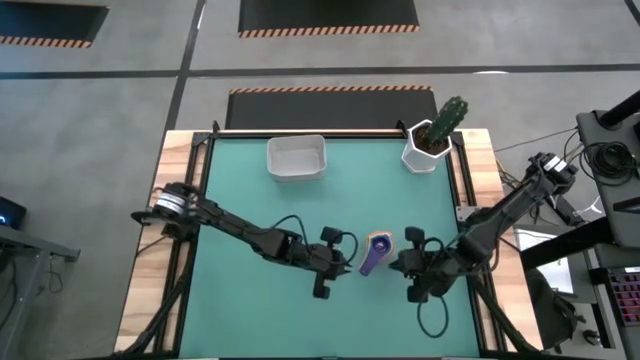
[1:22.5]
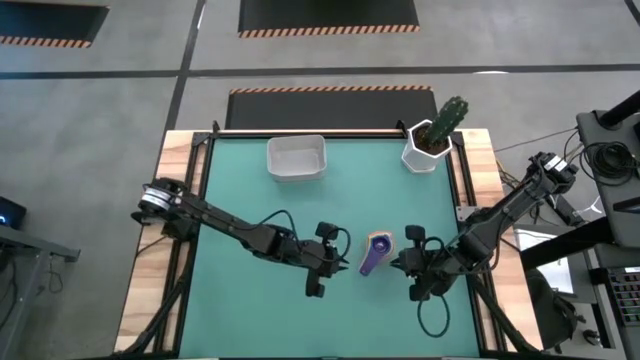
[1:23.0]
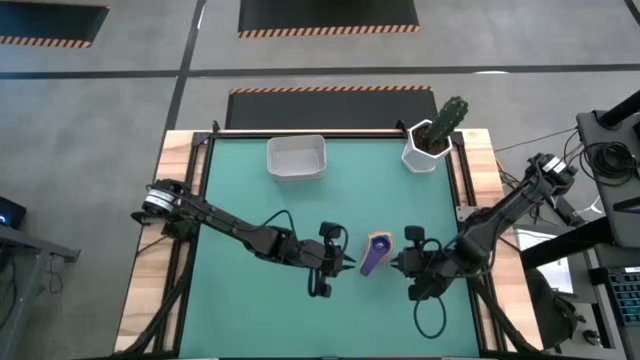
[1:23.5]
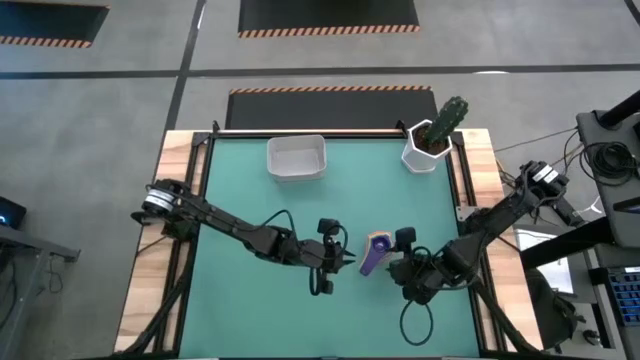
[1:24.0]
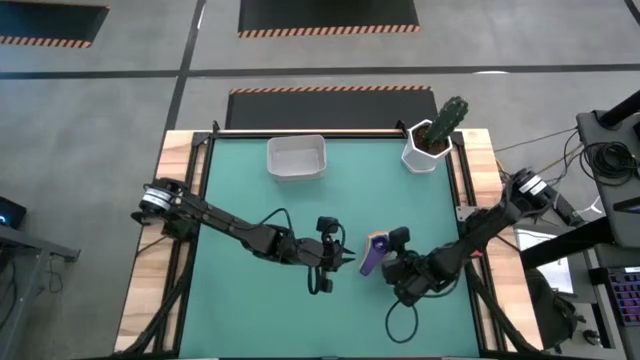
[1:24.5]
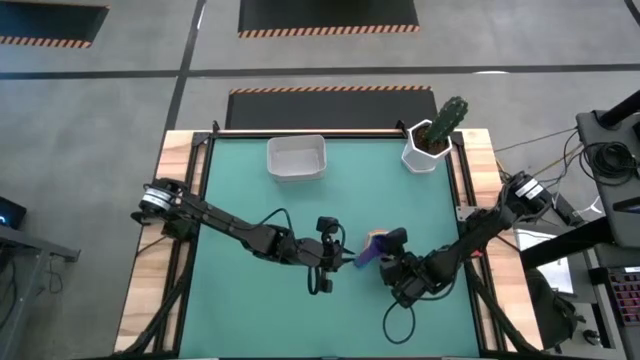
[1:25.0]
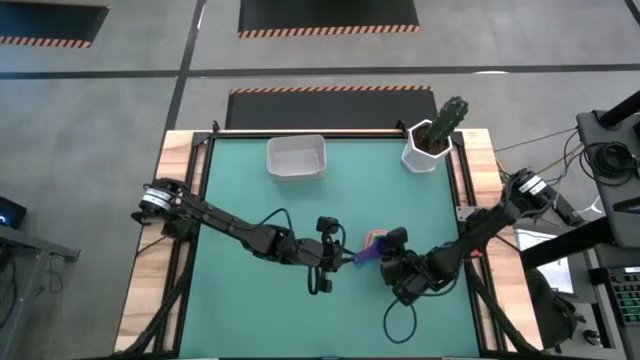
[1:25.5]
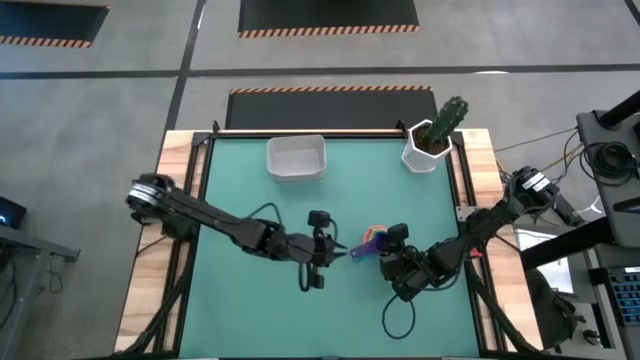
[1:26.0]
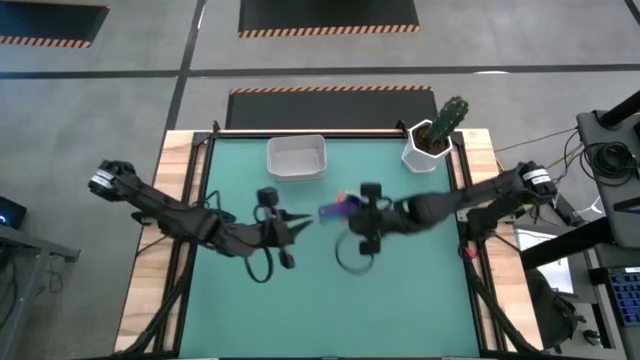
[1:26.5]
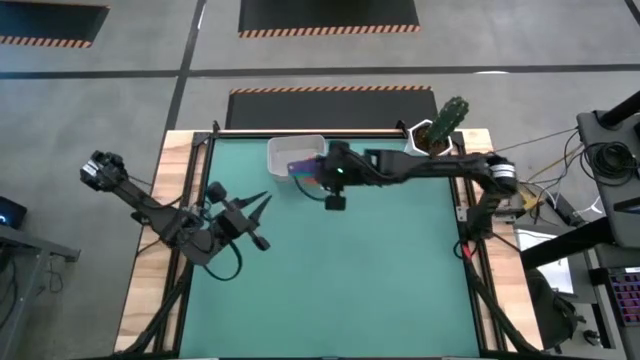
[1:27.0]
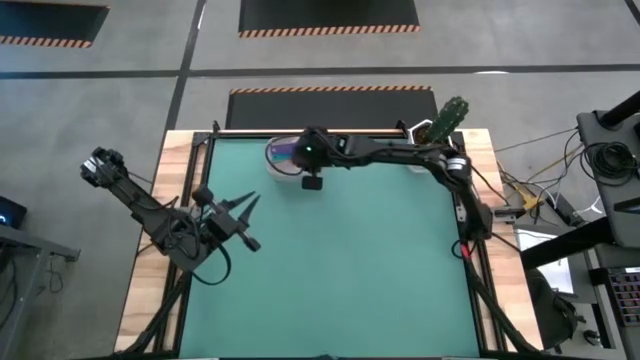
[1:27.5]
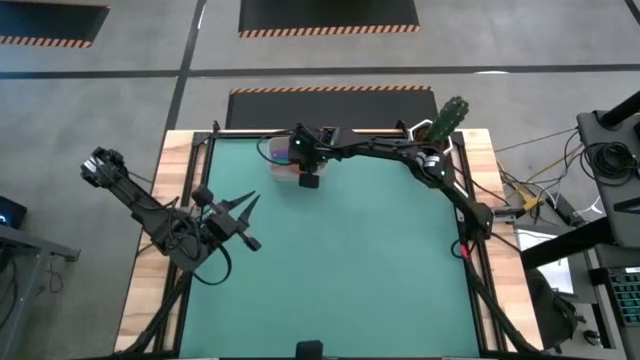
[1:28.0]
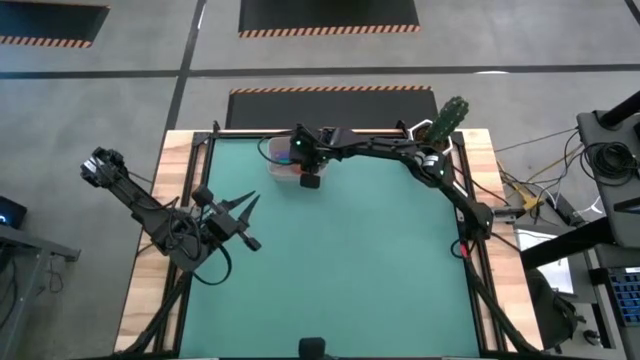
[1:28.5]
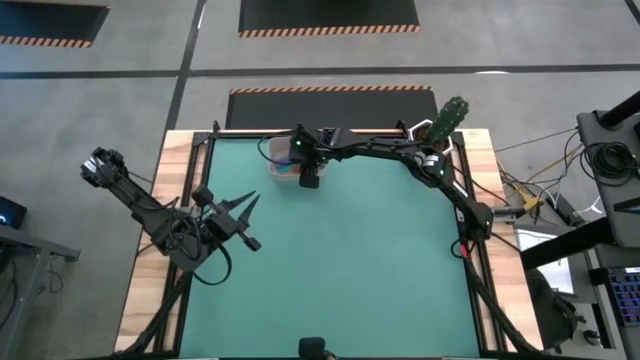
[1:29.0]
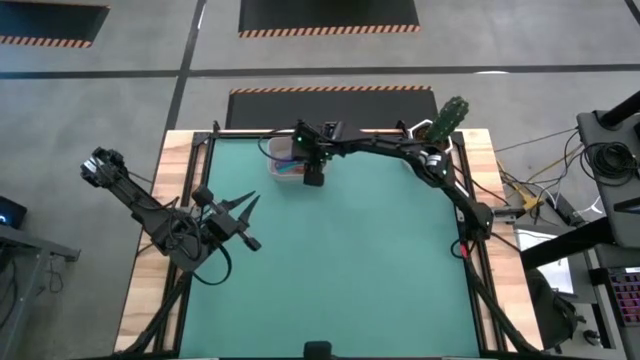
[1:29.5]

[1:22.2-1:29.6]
Task: Nest measuring cups in basket
Put the stacked measuring cups into the white bin

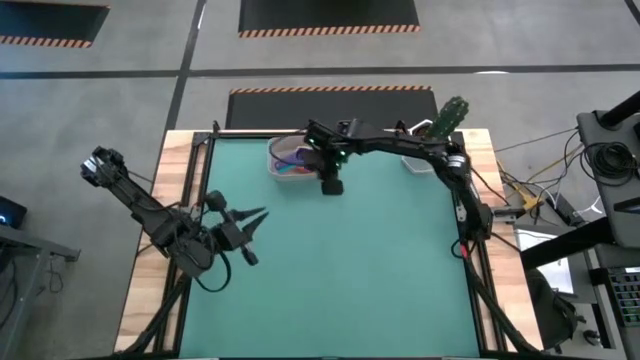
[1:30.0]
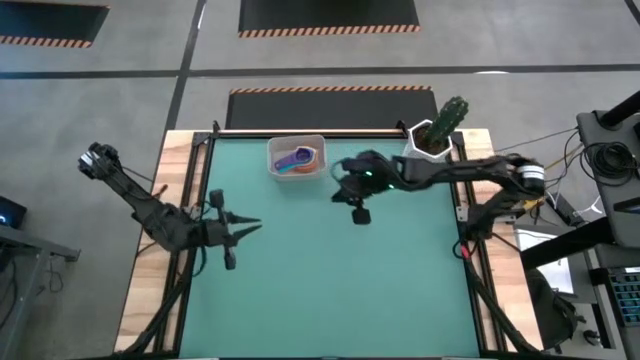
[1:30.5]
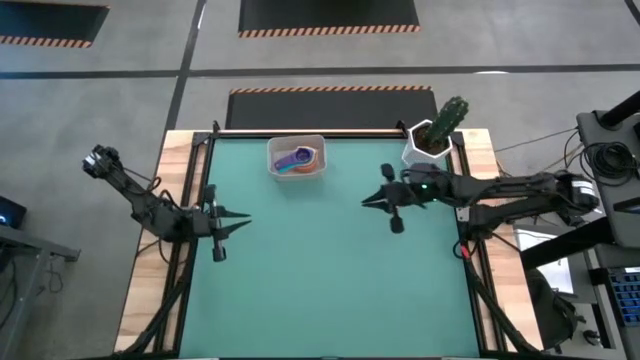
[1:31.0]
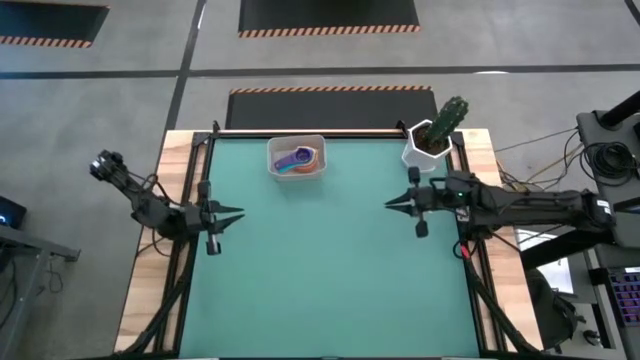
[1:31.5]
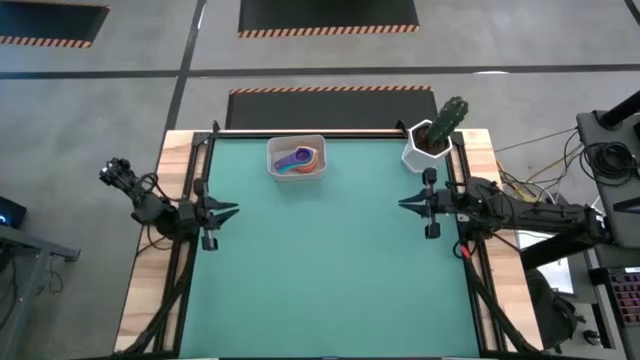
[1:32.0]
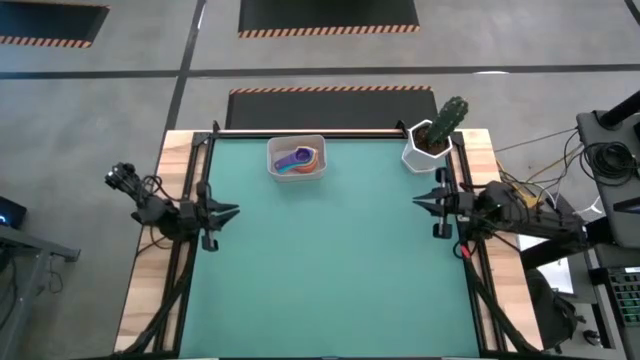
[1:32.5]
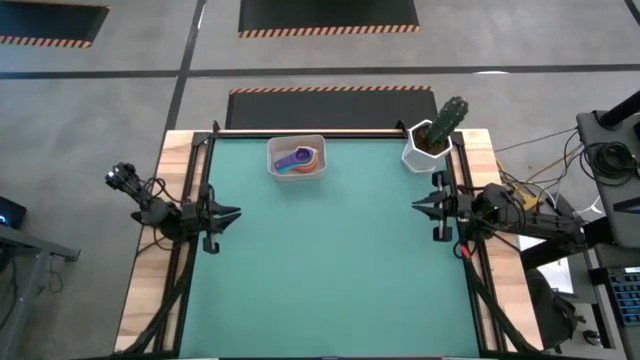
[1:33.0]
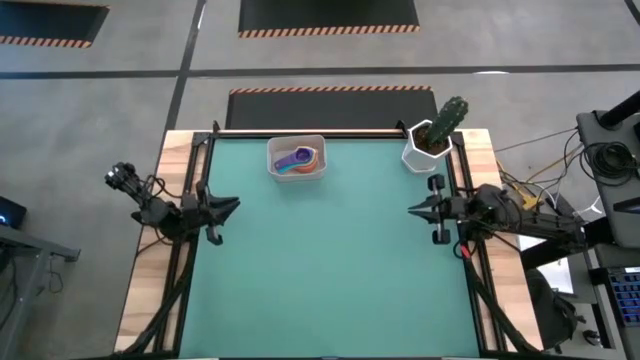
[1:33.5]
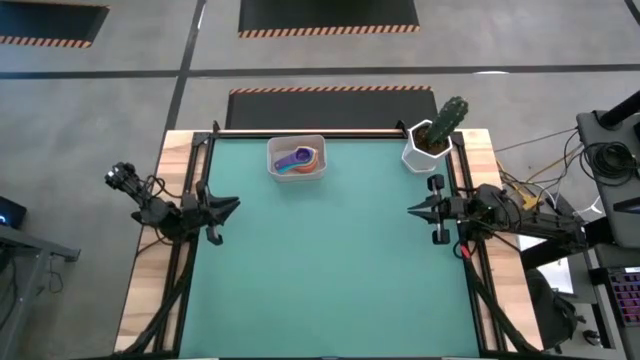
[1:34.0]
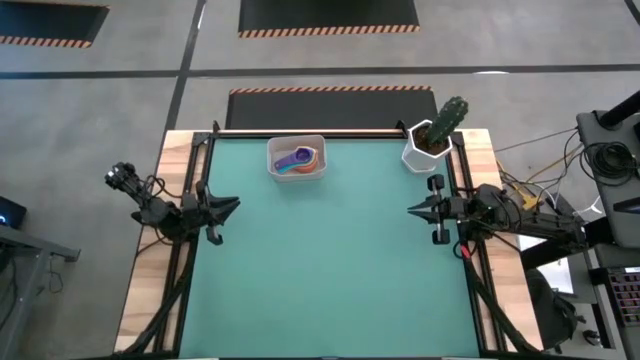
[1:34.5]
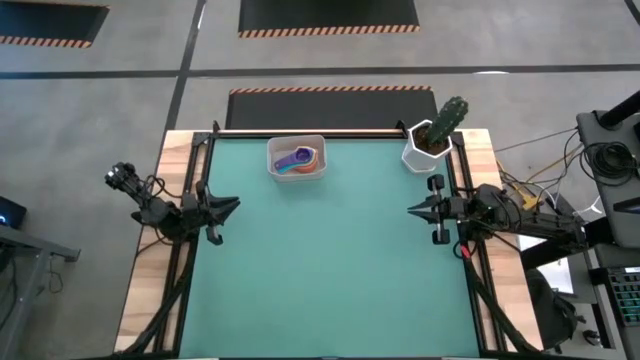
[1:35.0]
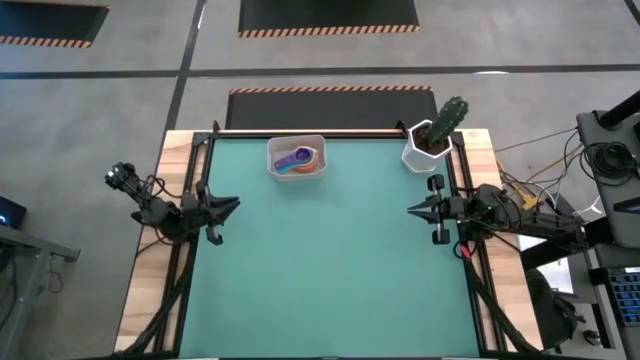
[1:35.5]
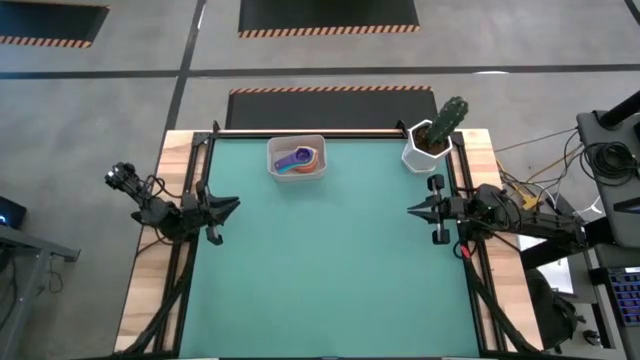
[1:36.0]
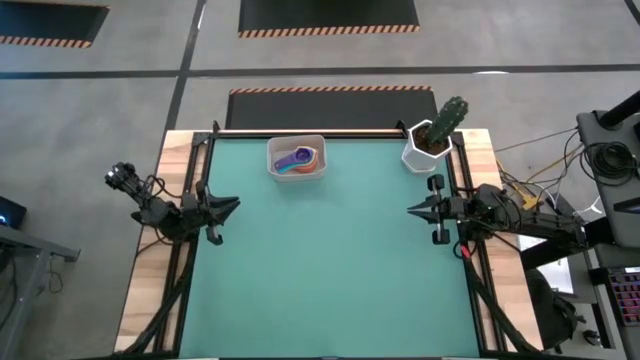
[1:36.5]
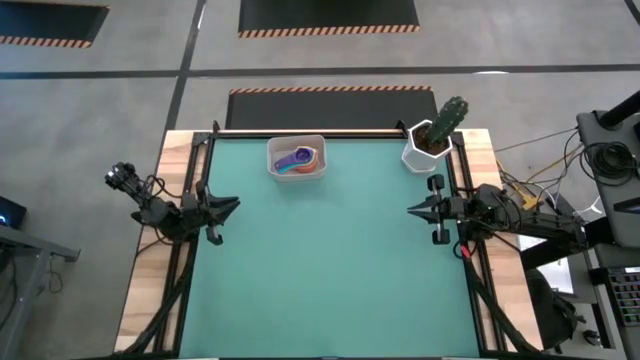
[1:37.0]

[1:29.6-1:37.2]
Return to home position

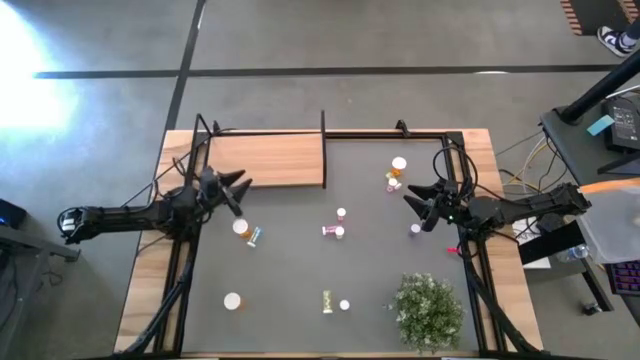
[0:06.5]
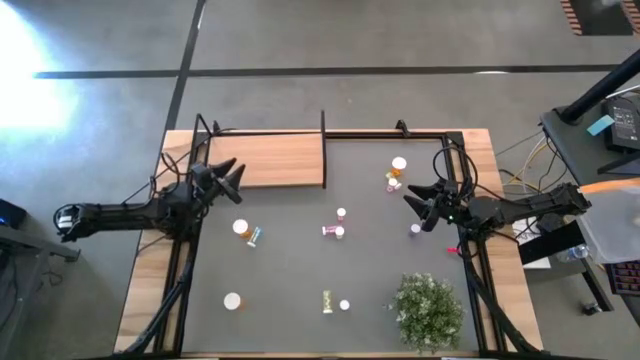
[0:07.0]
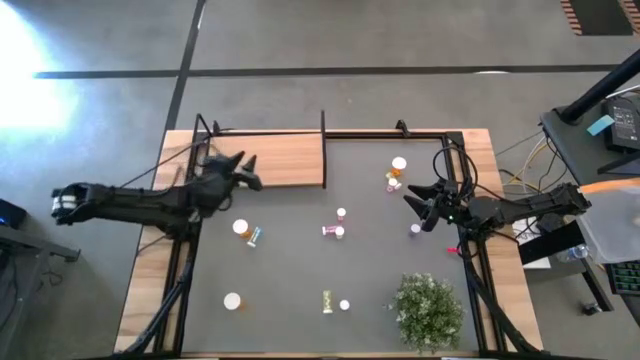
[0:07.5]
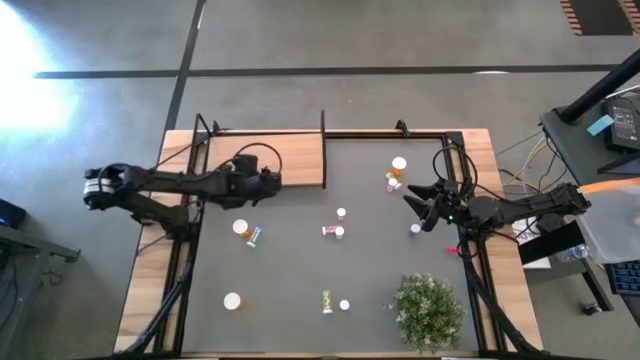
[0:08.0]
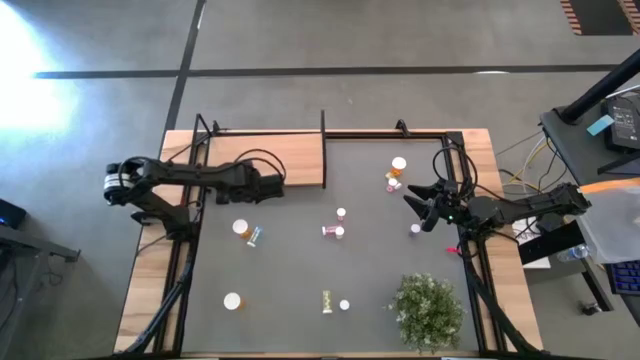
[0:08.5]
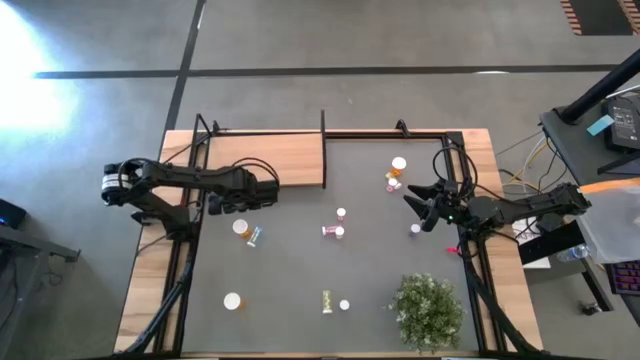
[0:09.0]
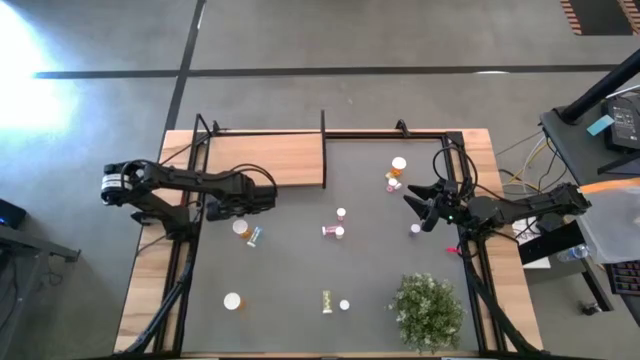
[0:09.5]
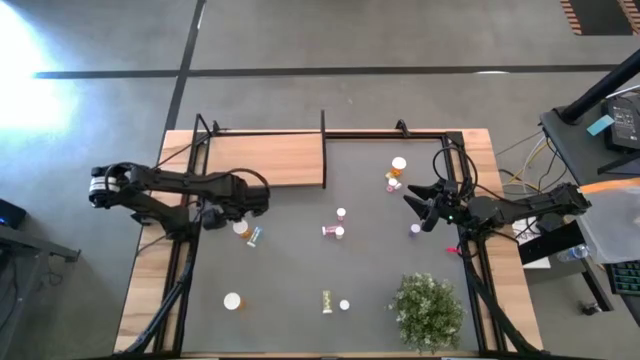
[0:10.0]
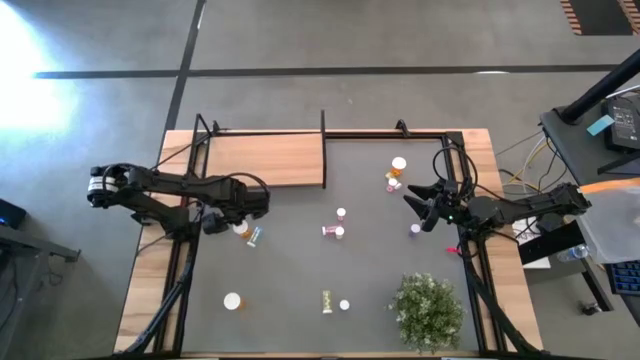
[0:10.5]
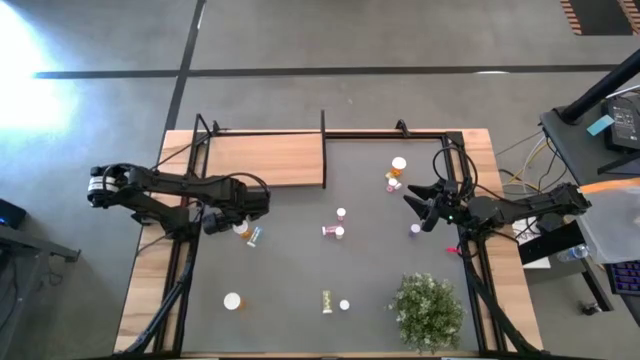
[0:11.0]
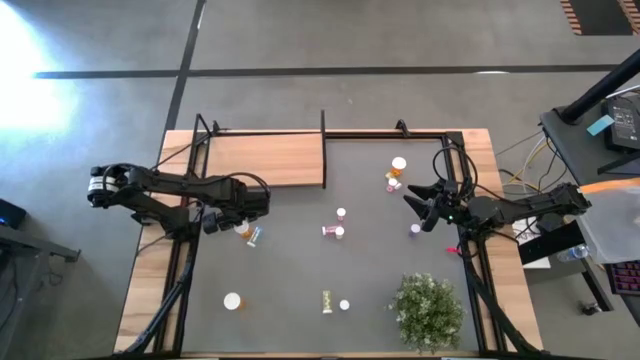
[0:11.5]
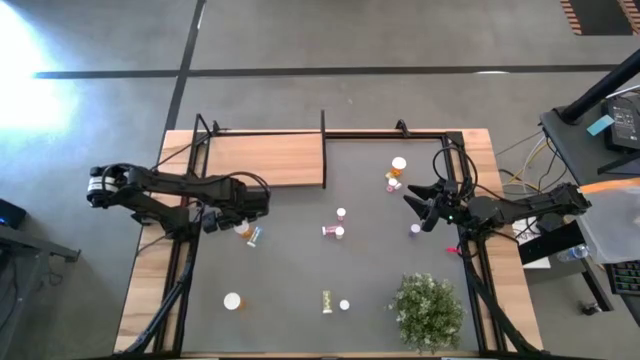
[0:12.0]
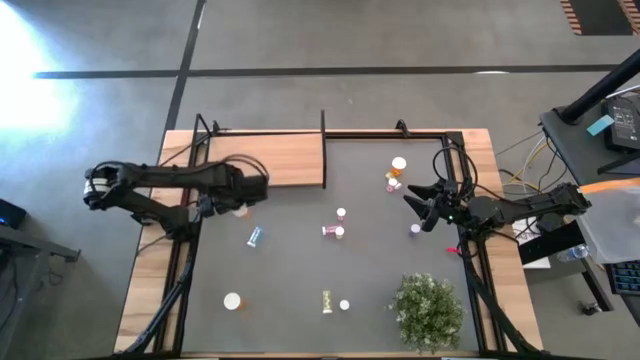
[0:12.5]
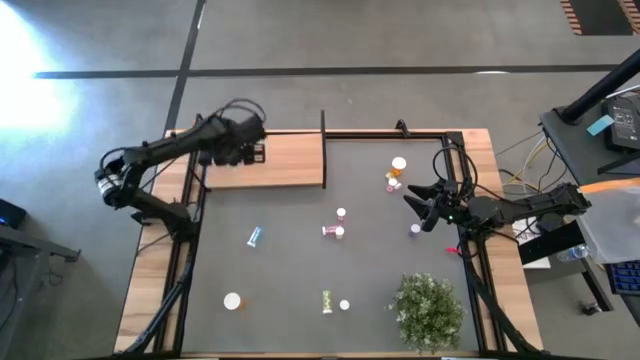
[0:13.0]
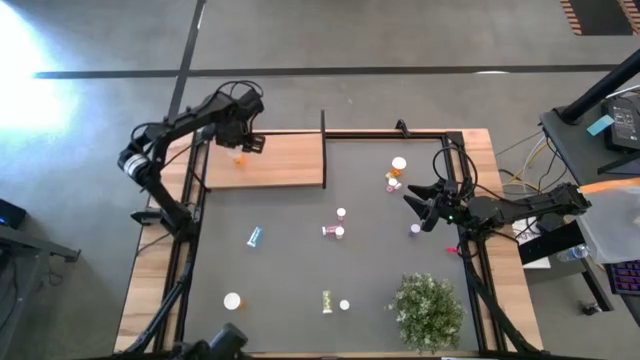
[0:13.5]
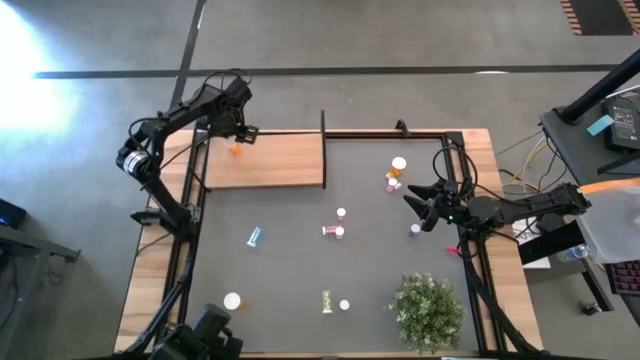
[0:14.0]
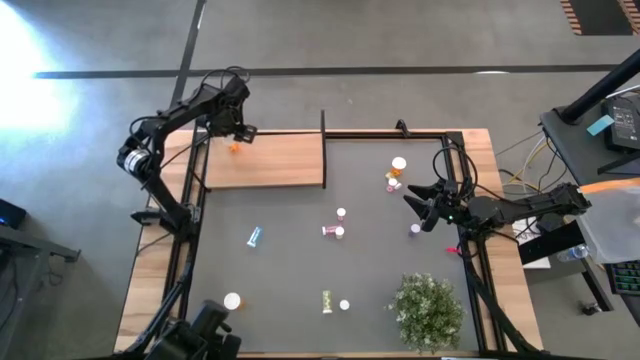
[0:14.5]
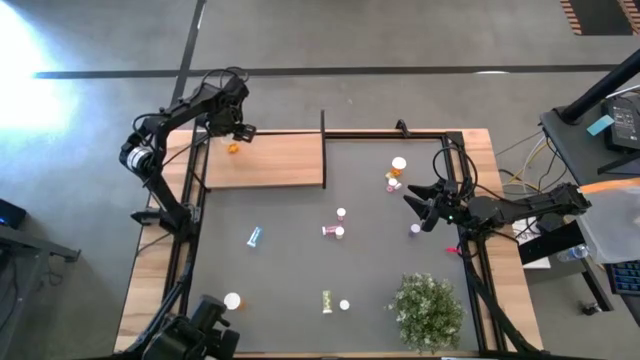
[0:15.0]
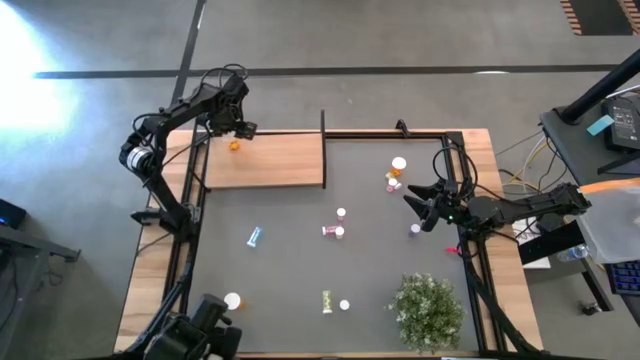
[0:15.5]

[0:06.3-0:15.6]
Task: Pick and place medicine bottles onto shelf by color
Put the middle left orange pill bottle on the shelf
